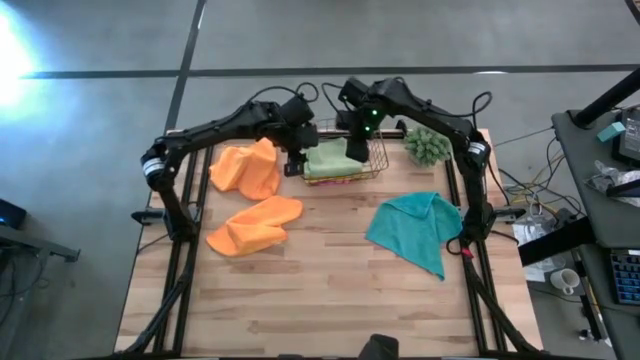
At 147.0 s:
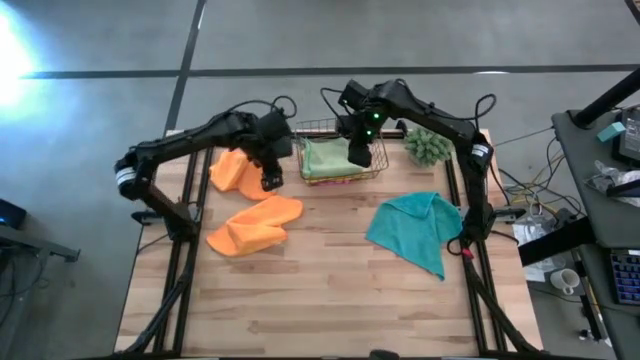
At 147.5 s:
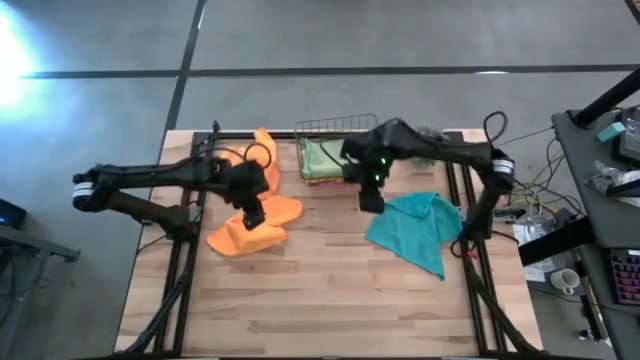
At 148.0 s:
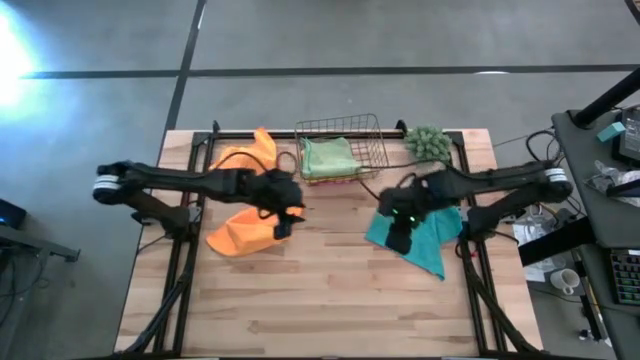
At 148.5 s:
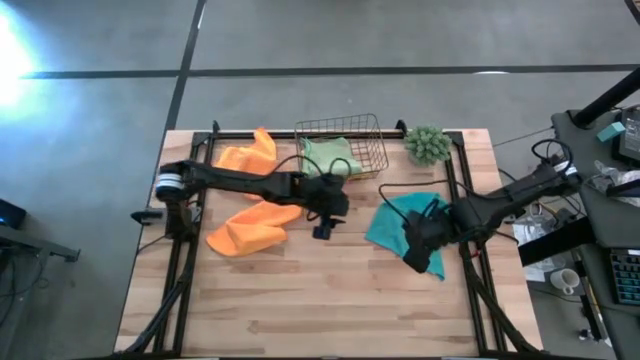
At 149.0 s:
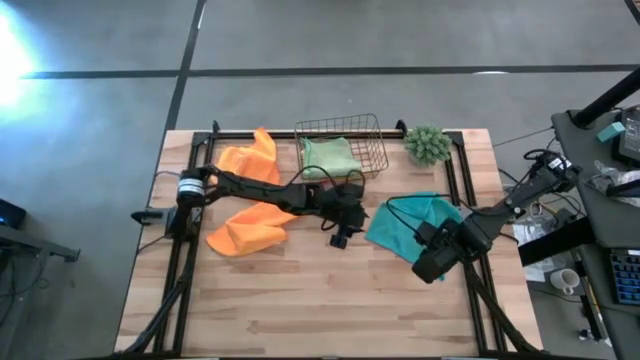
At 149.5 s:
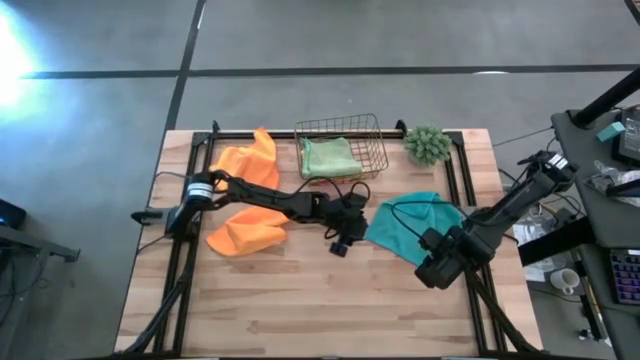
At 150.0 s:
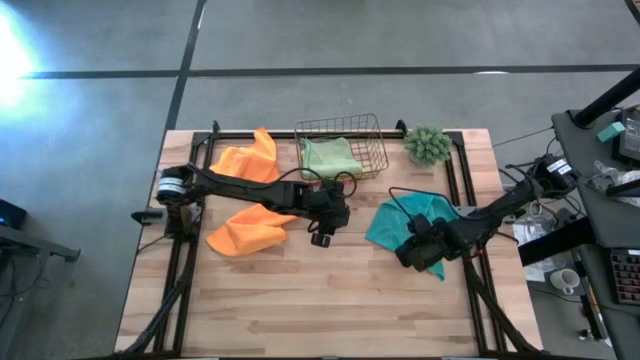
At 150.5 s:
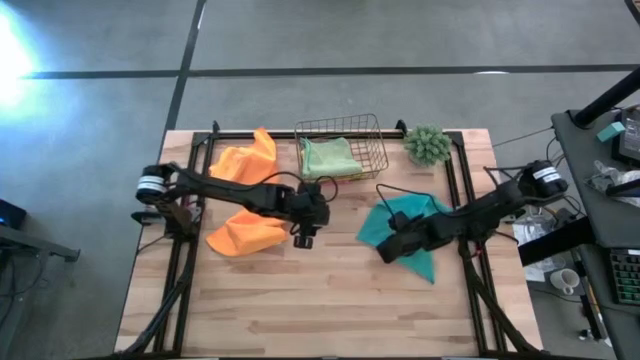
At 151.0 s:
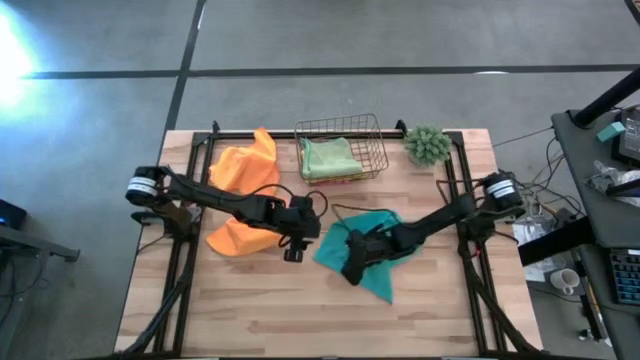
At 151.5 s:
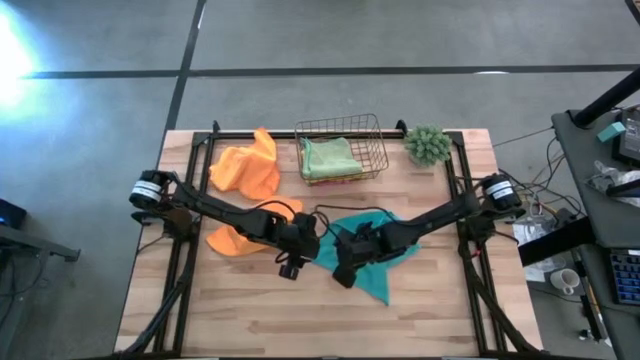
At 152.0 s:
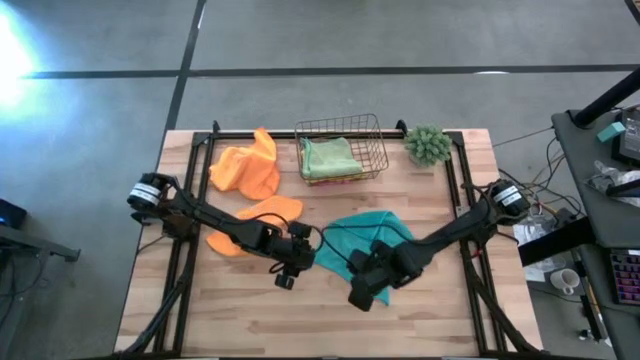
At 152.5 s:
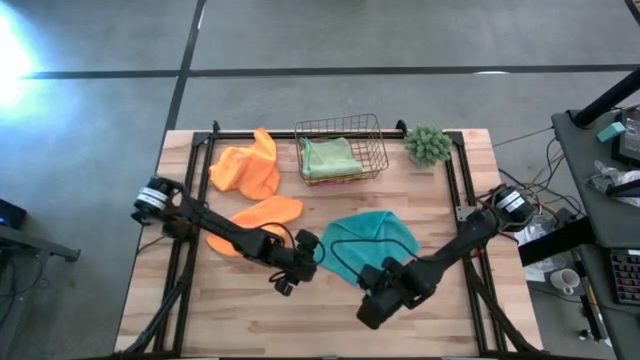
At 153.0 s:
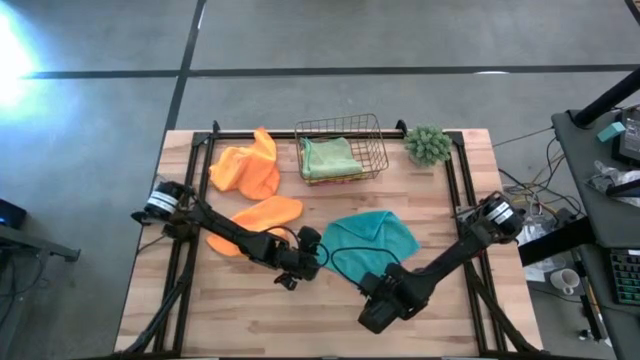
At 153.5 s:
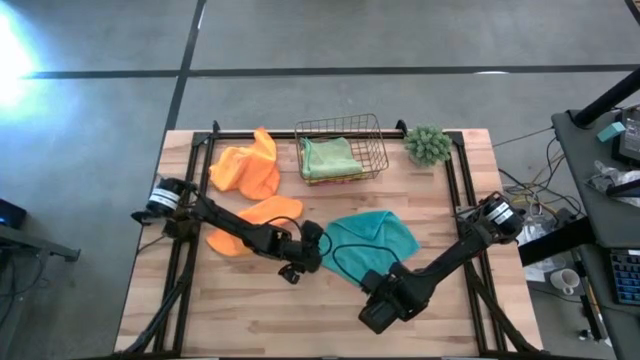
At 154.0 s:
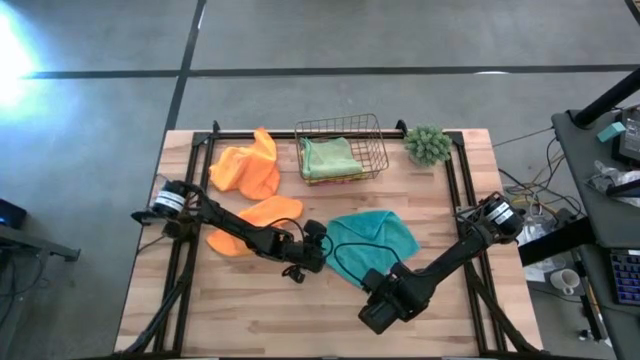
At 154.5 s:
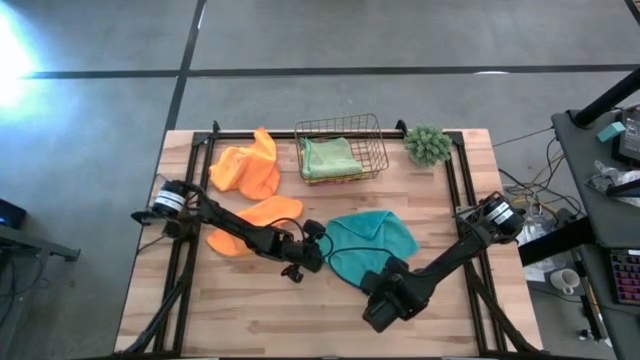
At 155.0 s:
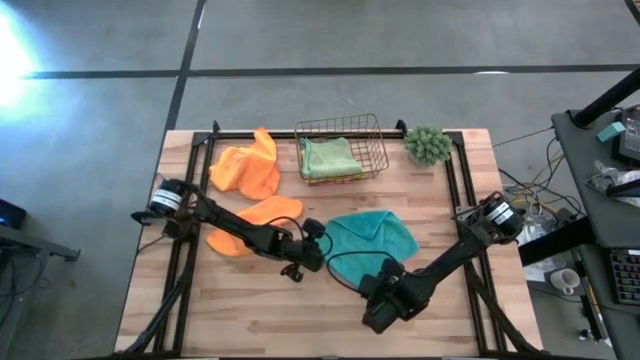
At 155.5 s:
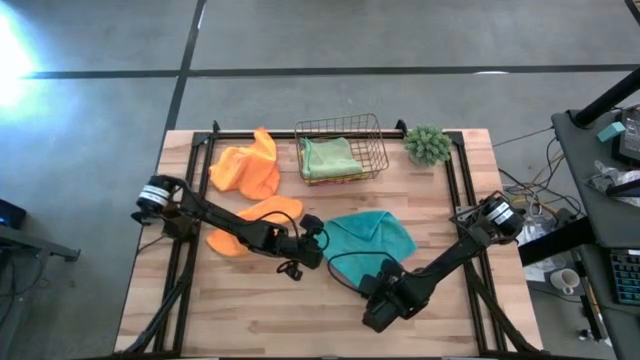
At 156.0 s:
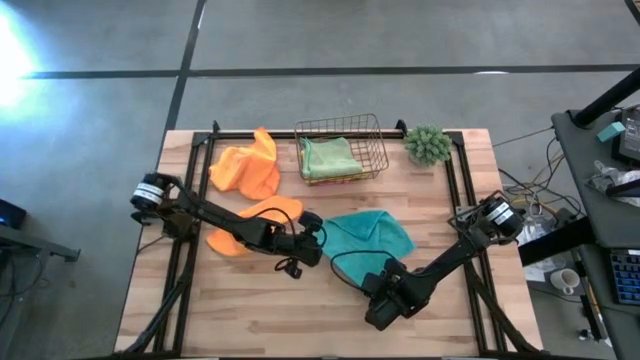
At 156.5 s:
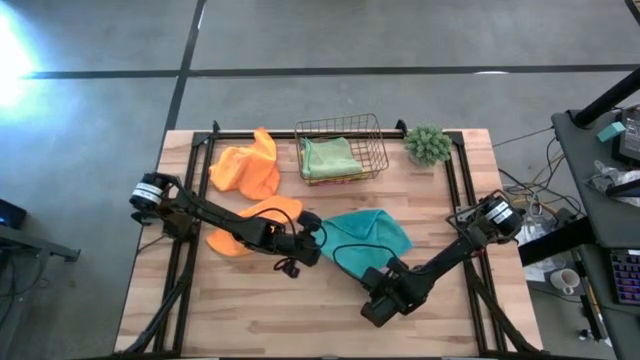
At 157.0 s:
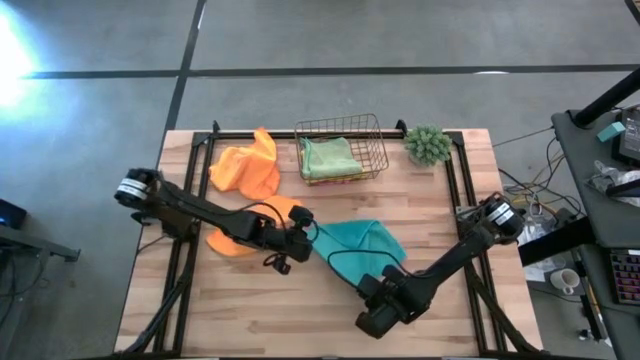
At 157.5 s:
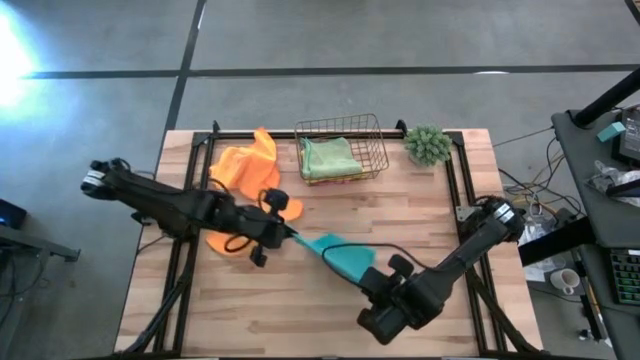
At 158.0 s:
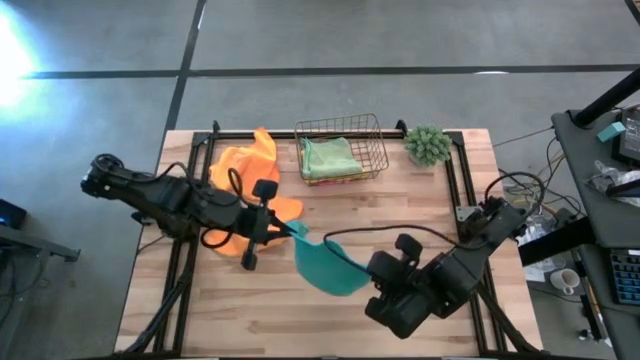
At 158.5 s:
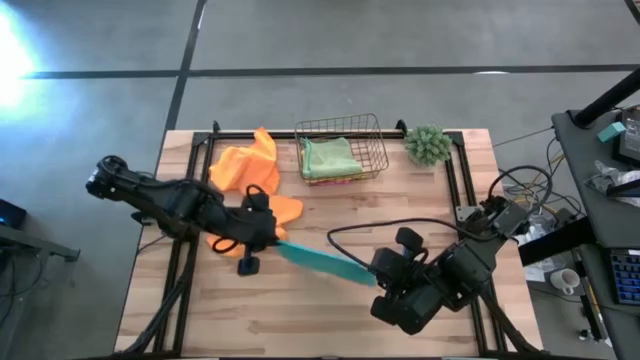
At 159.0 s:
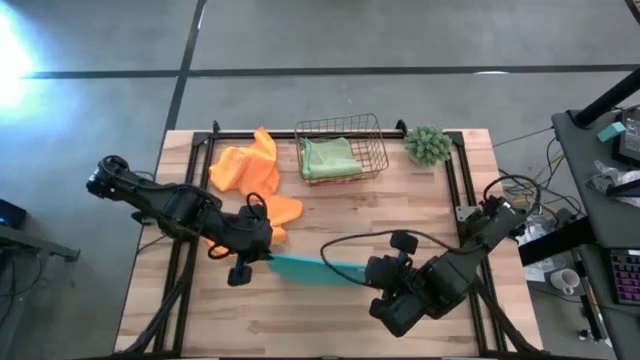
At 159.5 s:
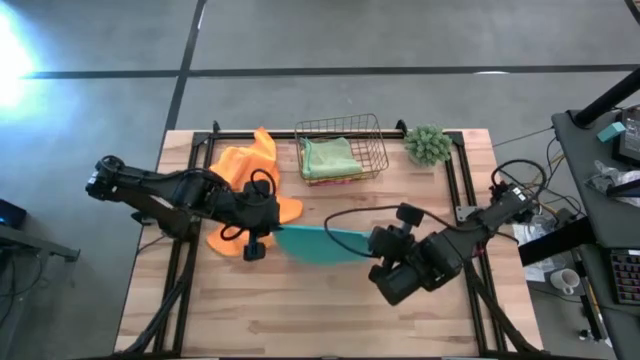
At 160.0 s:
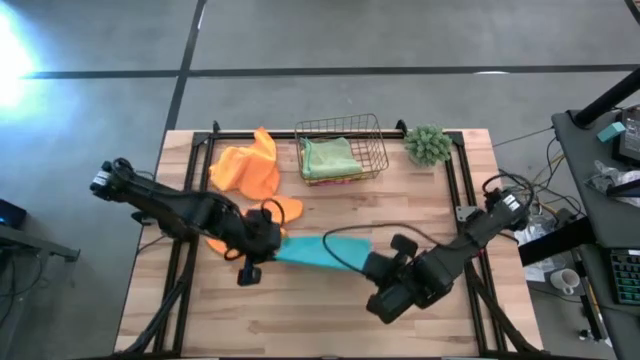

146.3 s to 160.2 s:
Task: Fold microfiber towels
Fold the blue microfiber cloth

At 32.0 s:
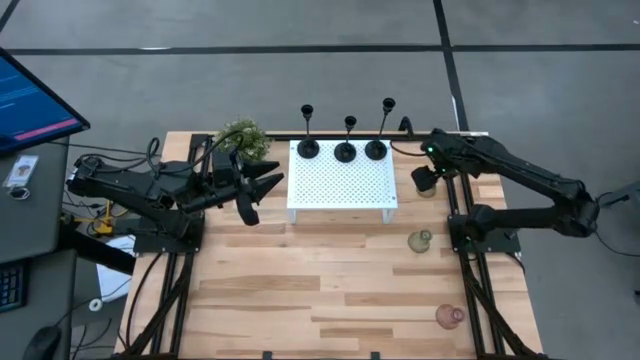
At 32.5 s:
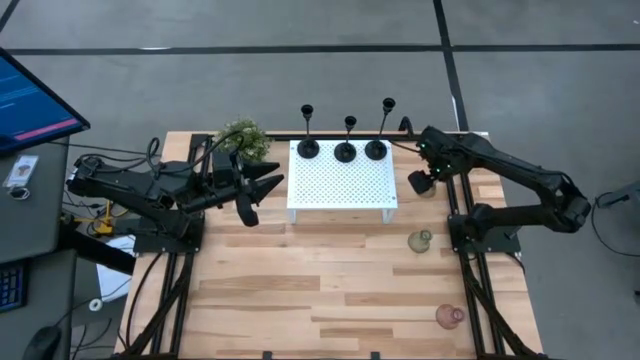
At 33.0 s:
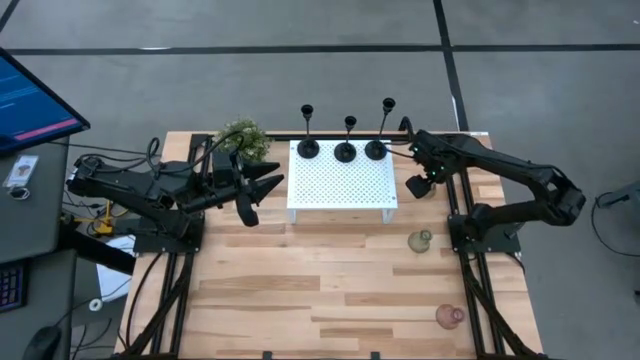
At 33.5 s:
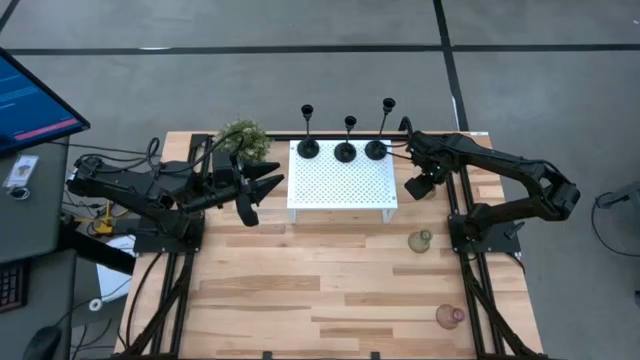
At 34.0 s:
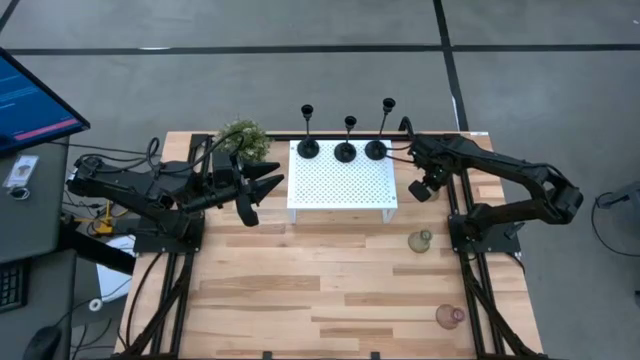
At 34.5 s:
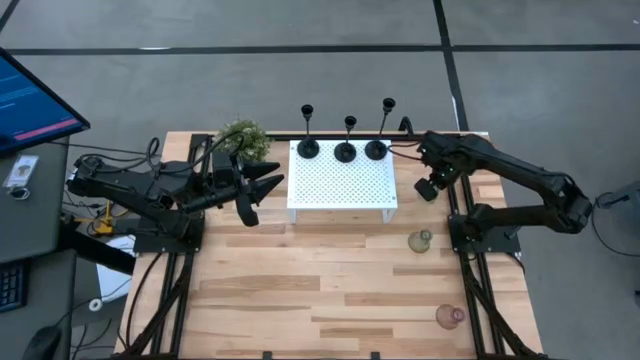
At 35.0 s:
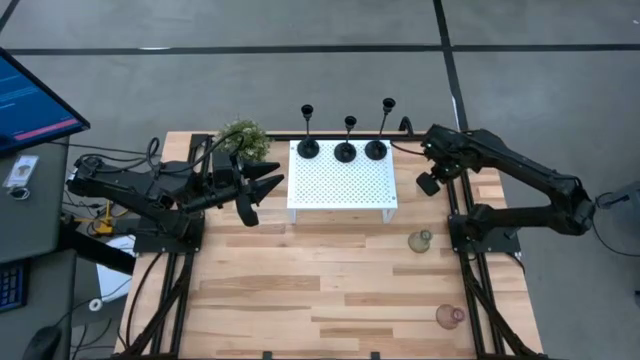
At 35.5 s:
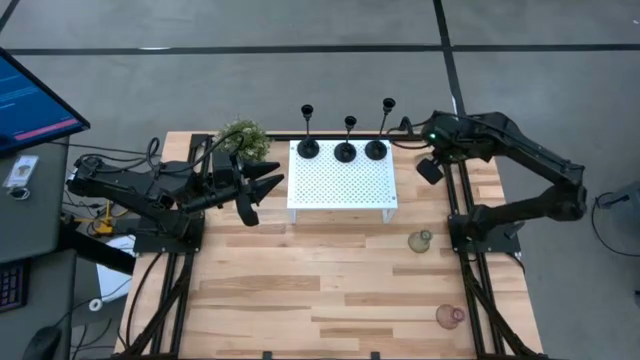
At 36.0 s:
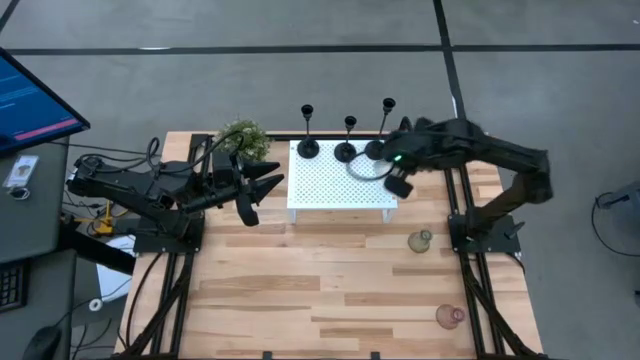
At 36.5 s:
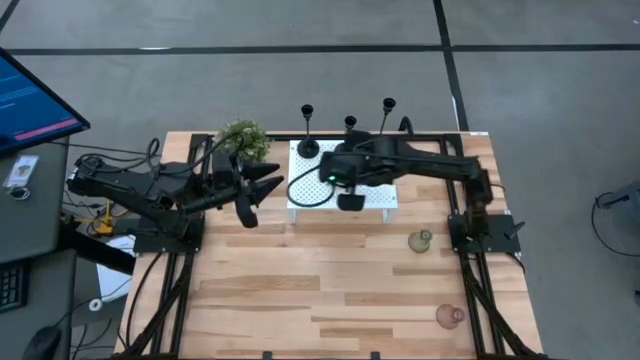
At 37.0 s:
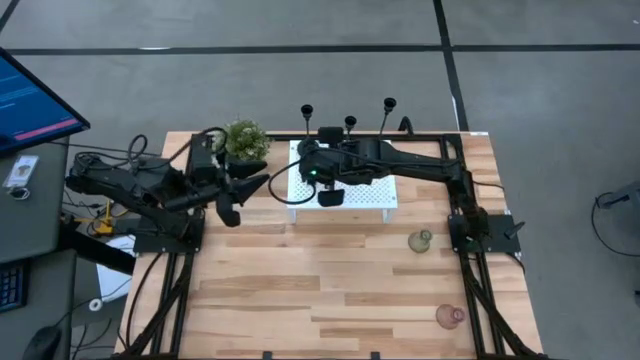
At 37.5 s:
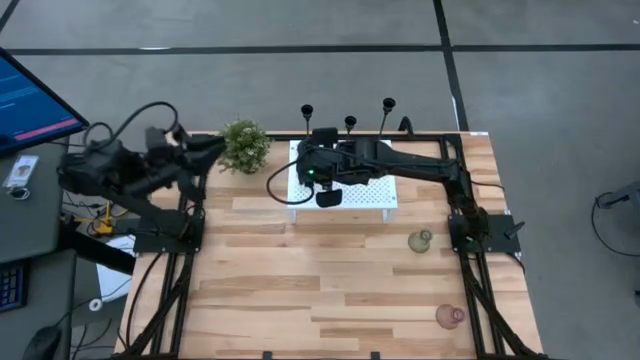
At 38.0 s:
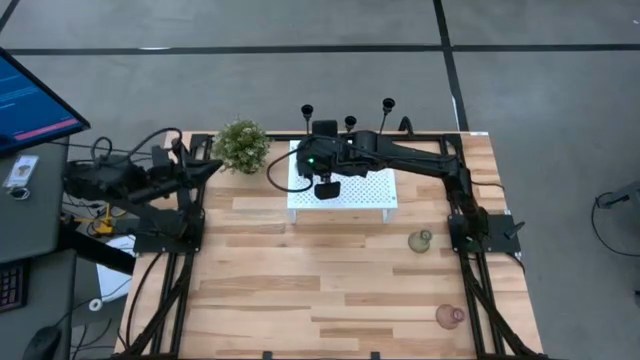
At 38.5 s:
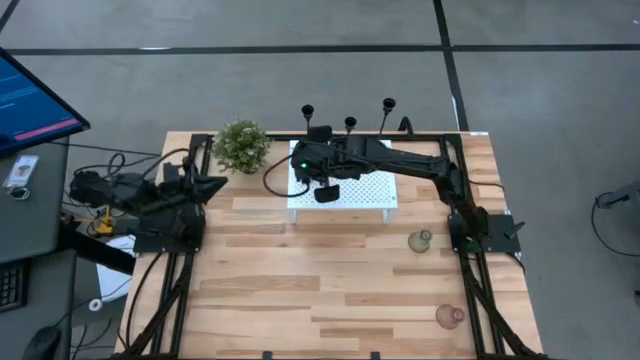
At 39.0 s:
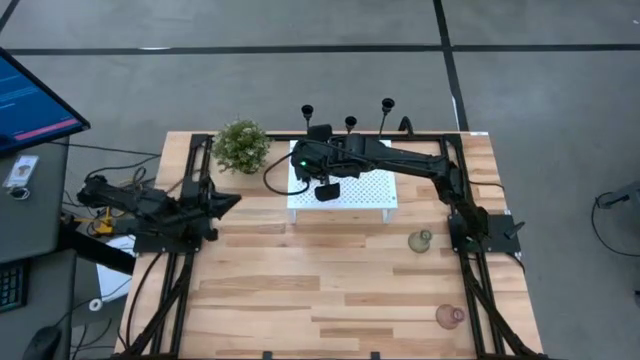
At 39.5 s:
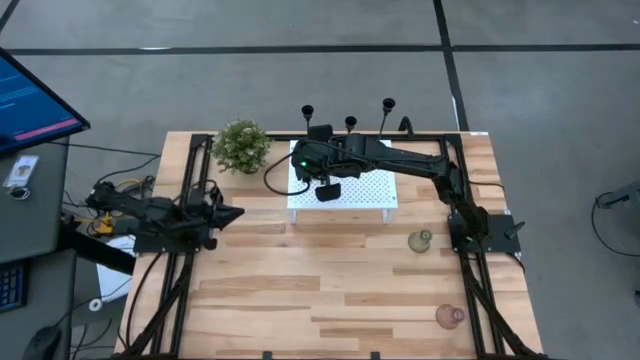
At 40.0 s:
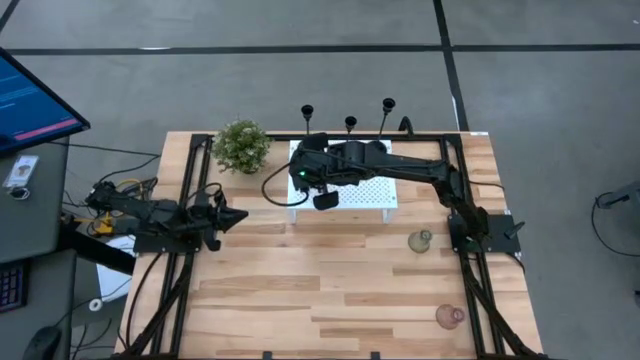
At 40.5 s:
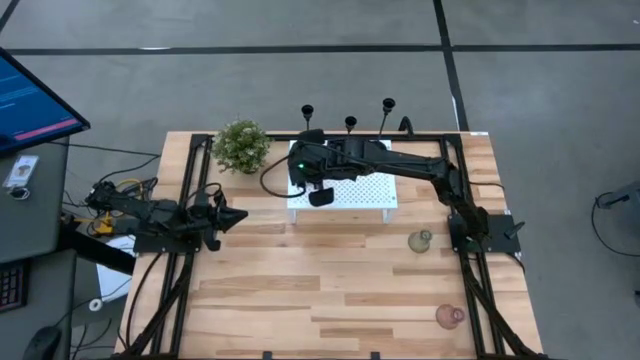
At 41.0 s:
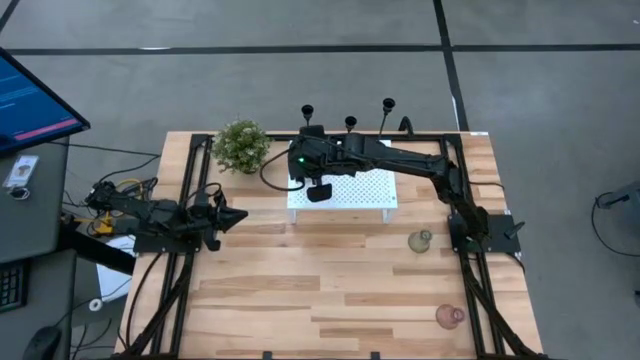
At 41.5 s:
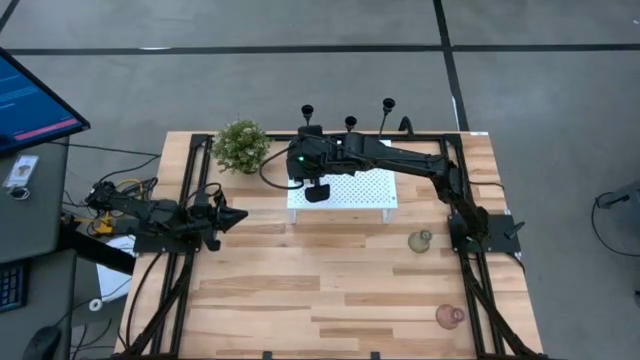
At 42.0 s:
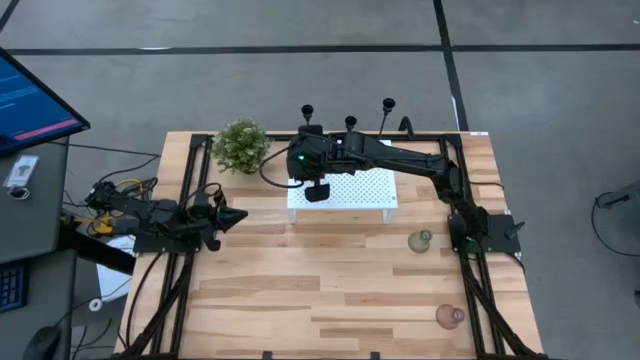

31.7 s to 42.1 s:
Task: Pick & Place candle stick holders
Put the top green candle holder on the shelf aligned with the left black candle holder
